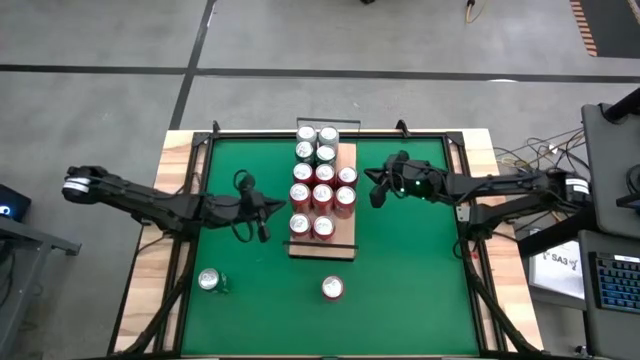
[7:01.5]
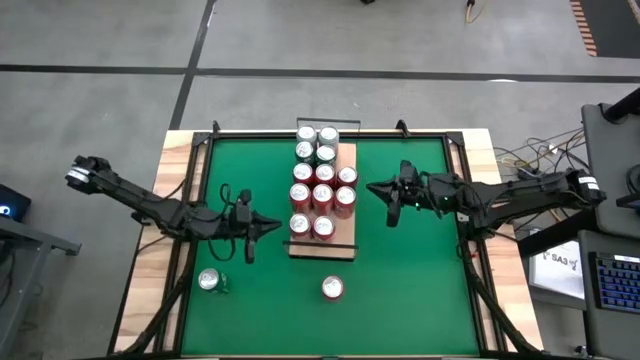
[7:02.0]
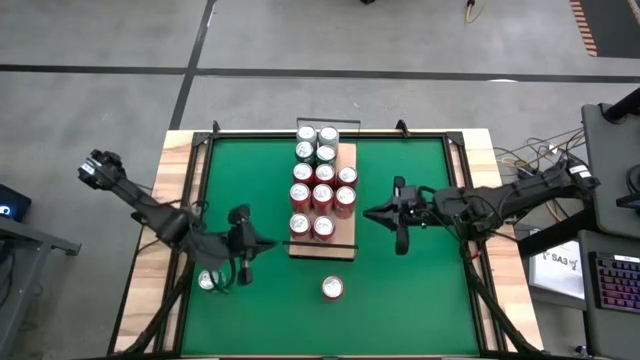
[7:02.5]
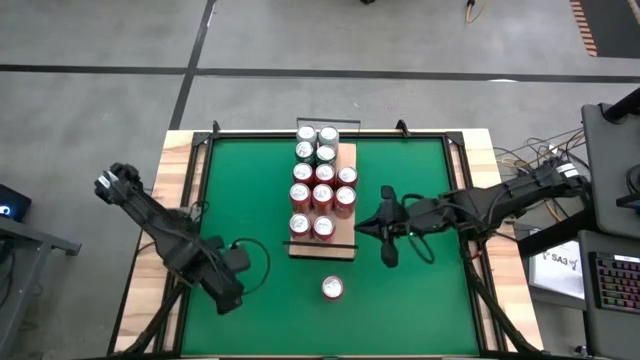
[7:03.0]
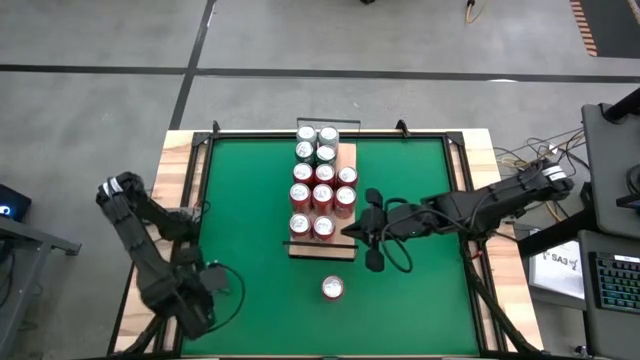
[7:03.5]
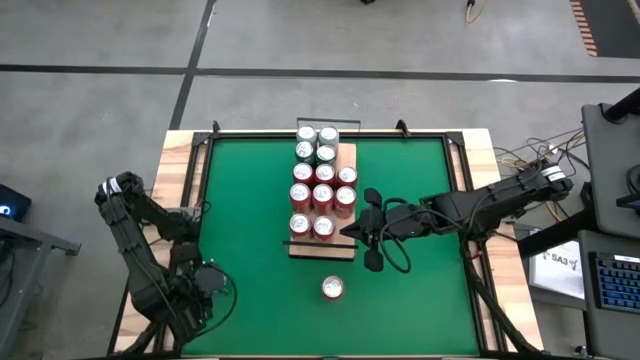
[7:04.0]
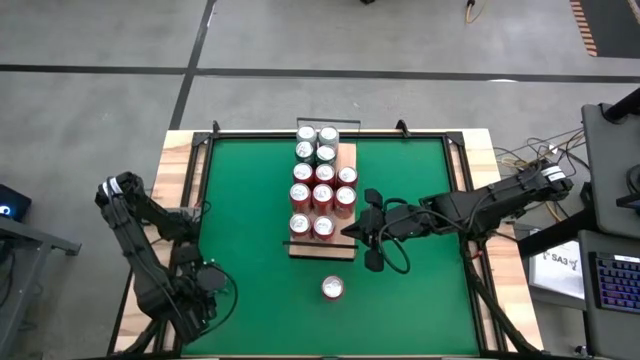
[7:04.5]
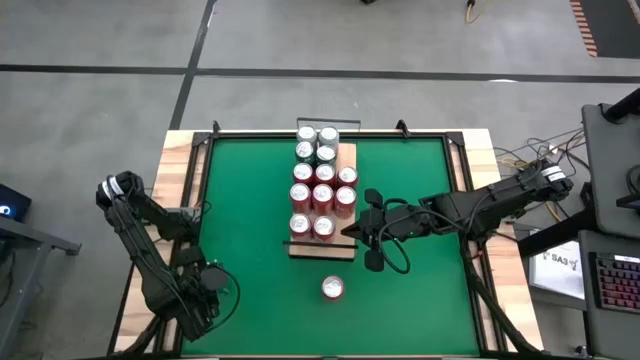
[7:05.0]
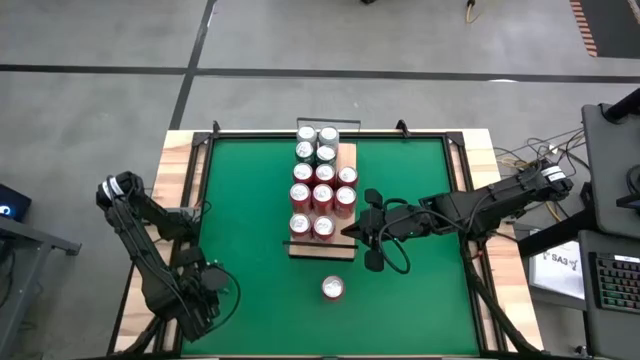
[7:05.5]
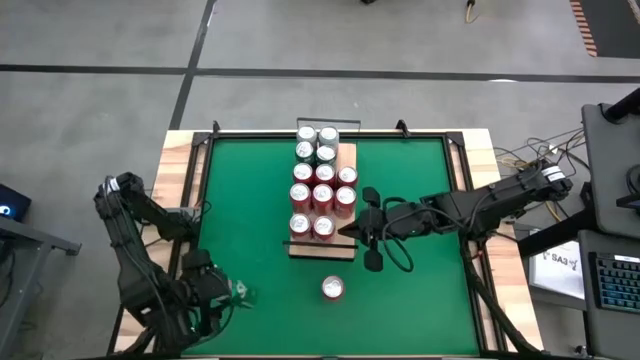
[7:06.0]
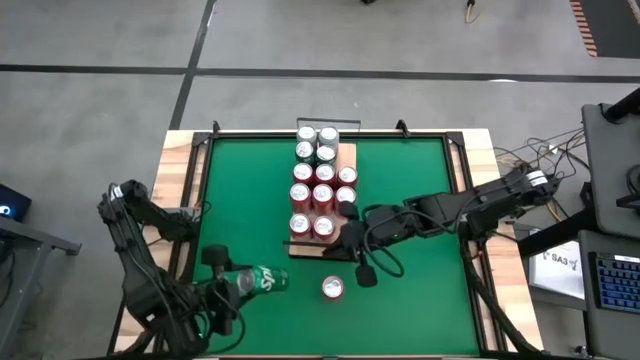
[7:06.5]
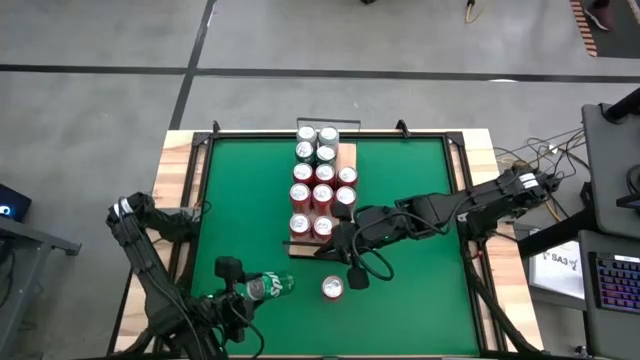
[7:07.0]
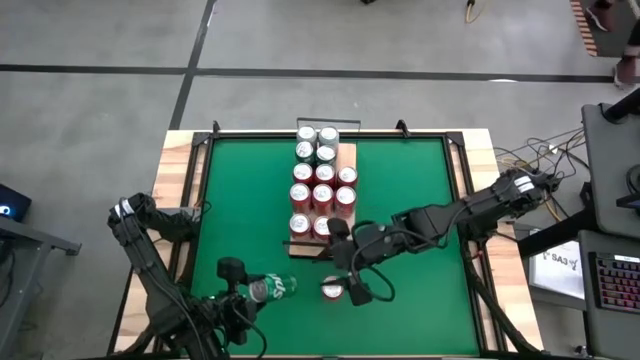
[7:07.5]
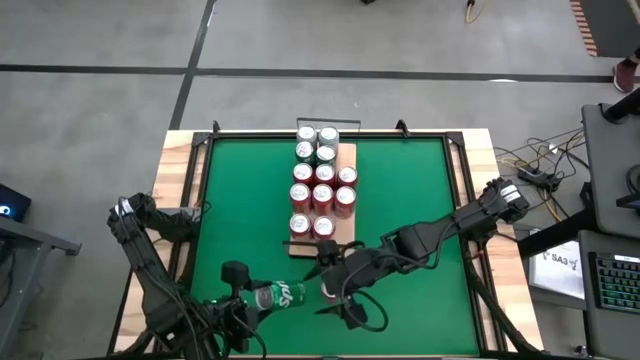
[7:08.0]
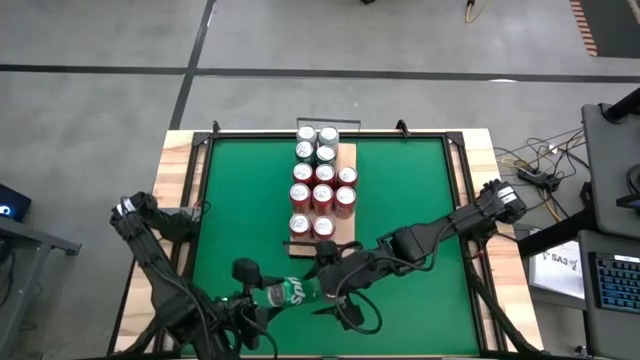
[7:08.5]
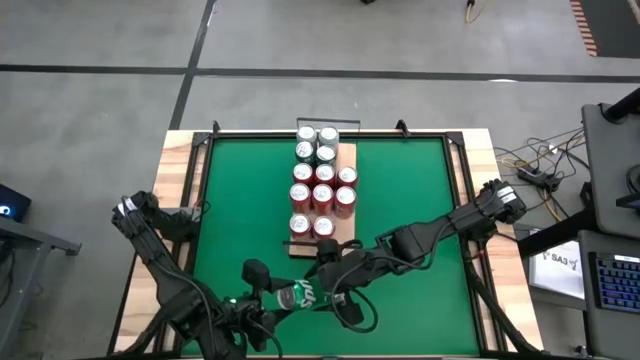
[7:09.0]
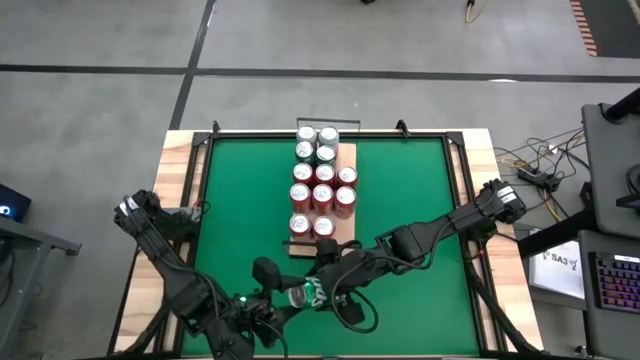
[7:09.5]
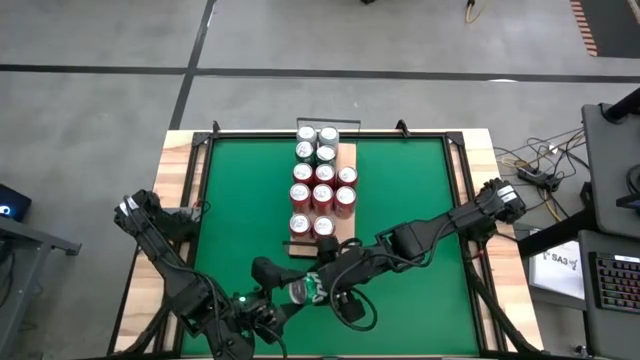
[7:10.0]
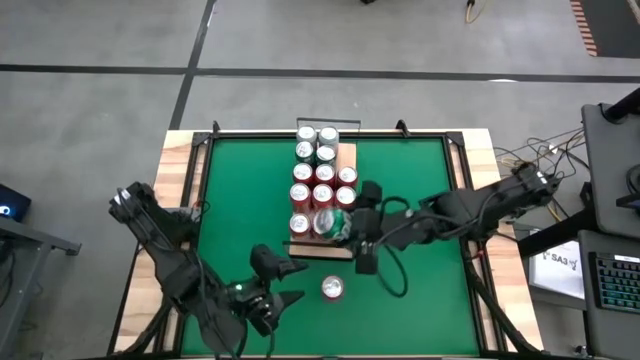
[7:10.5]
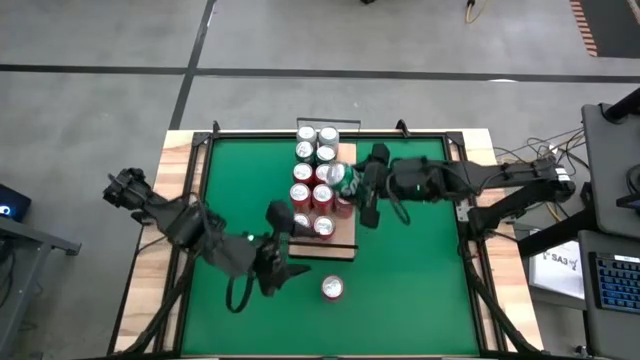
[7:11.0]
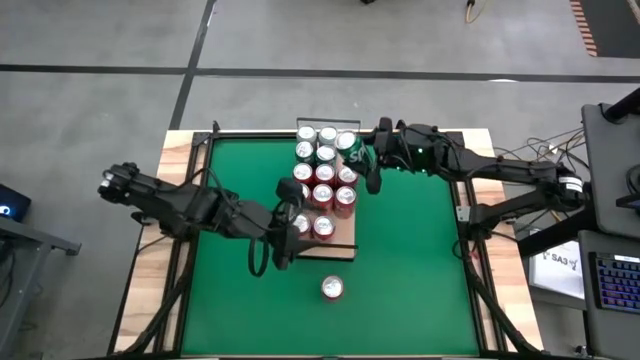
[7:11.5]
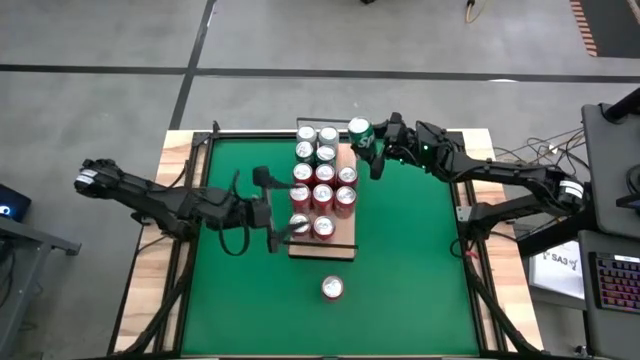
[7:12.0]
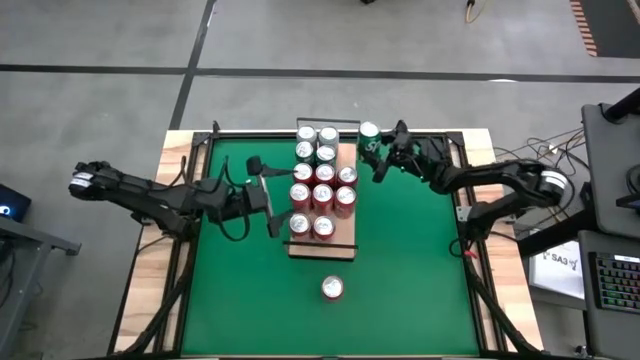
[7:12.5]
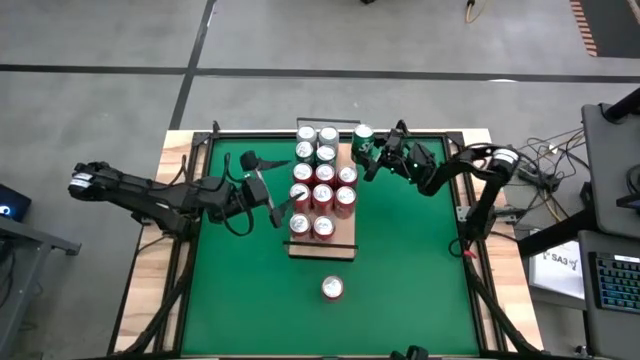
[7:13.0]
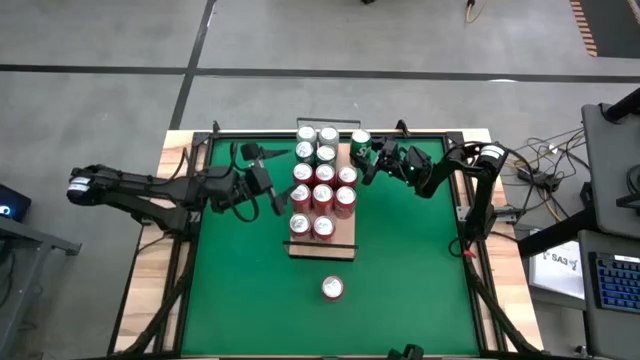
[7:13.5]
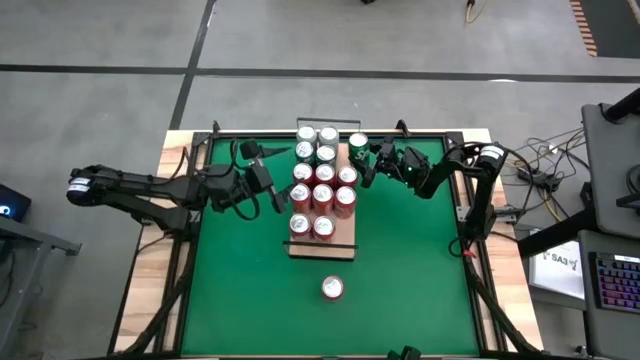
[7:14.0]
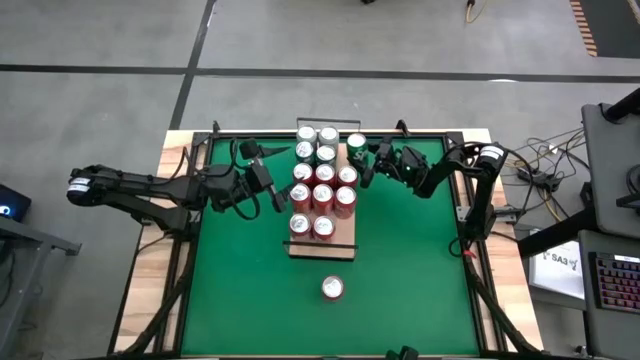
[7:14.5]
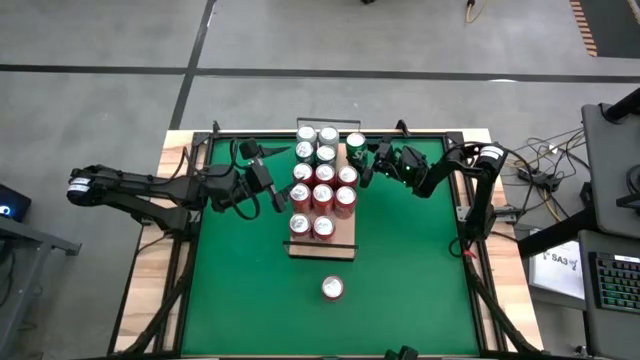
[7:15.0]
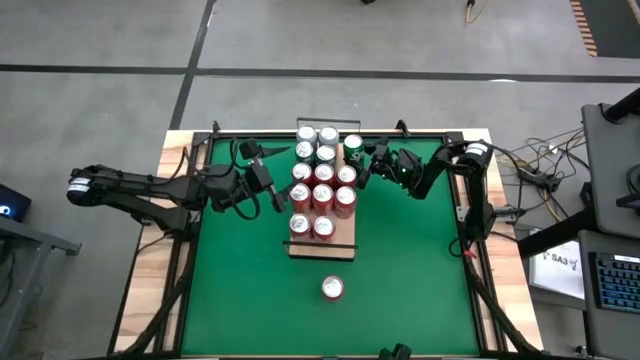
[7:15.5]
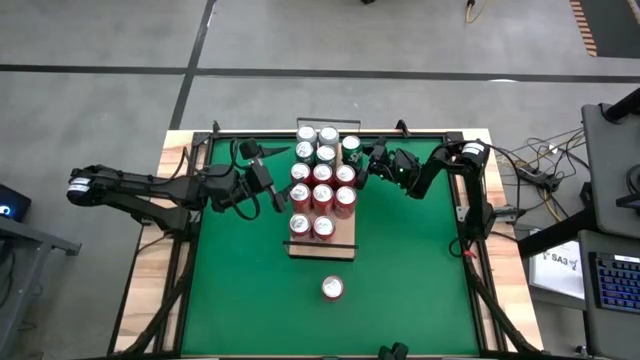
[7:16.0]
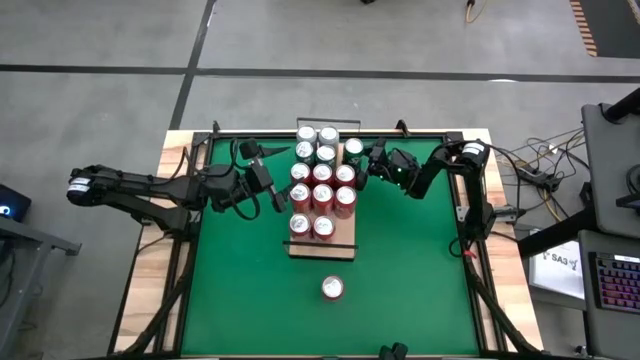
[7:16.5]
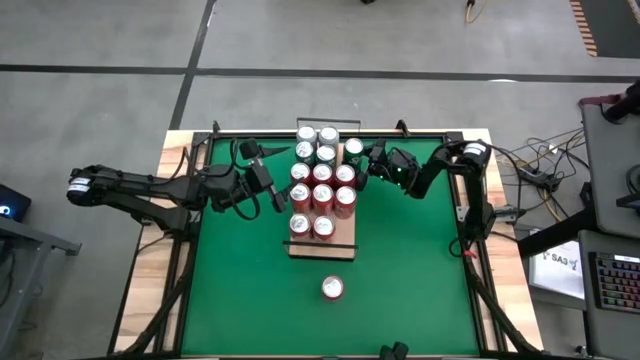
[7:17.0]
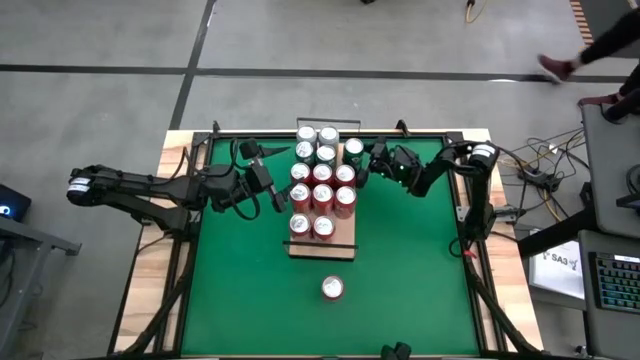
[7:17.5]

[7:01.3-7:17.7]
Task: Place canned beverage on shelf
Put the green soda can on the shelf and aligned with the other green soda can

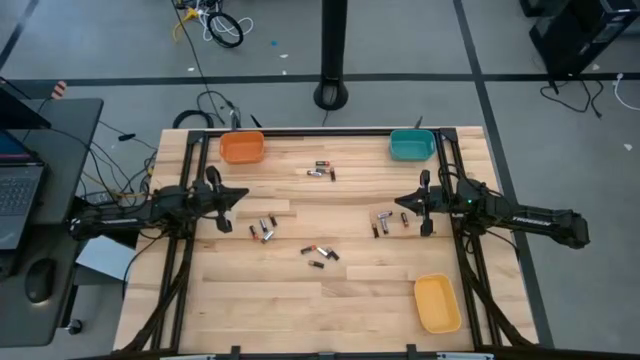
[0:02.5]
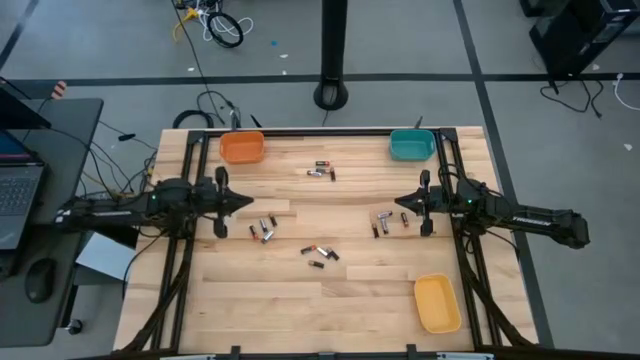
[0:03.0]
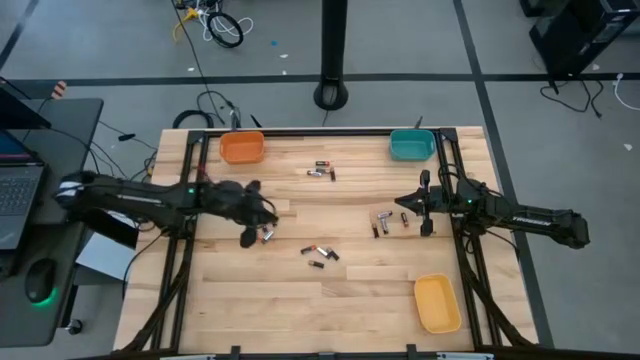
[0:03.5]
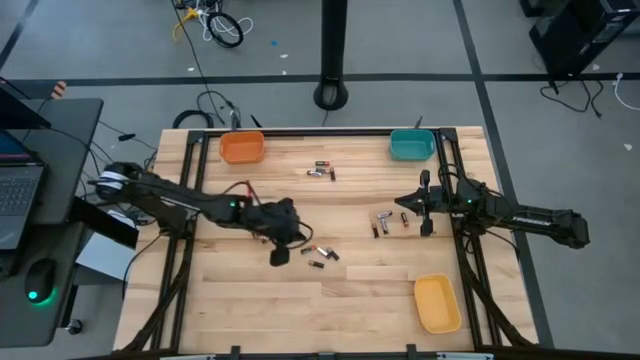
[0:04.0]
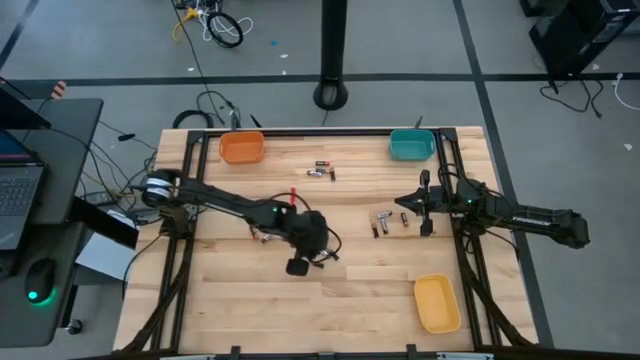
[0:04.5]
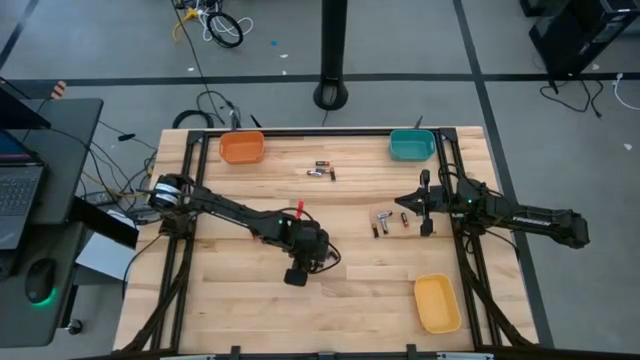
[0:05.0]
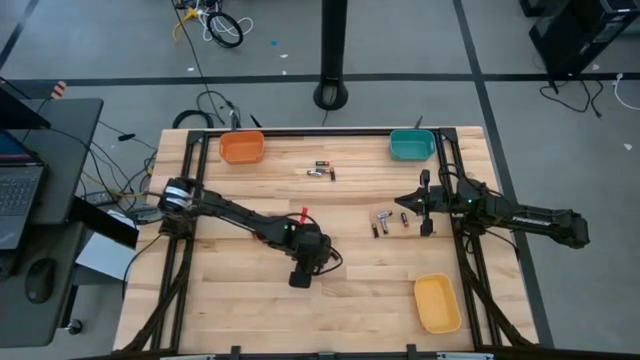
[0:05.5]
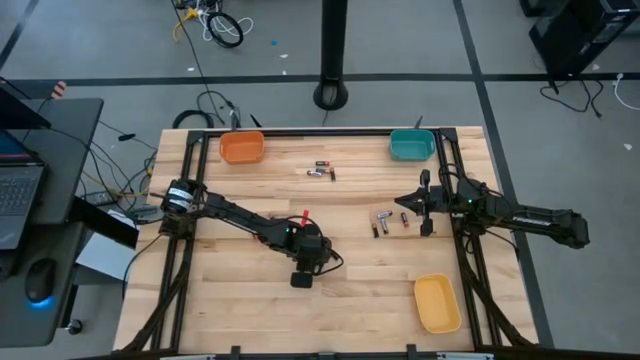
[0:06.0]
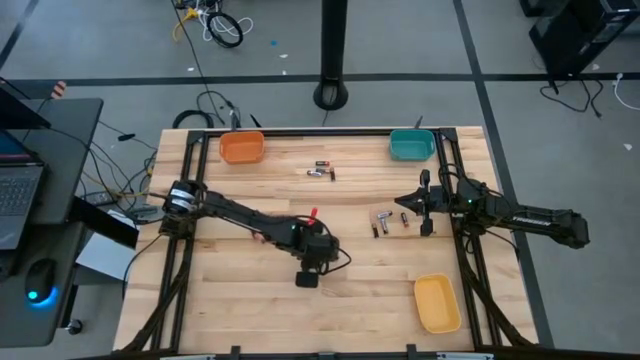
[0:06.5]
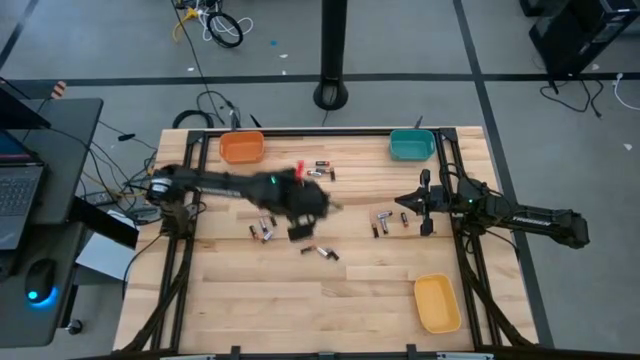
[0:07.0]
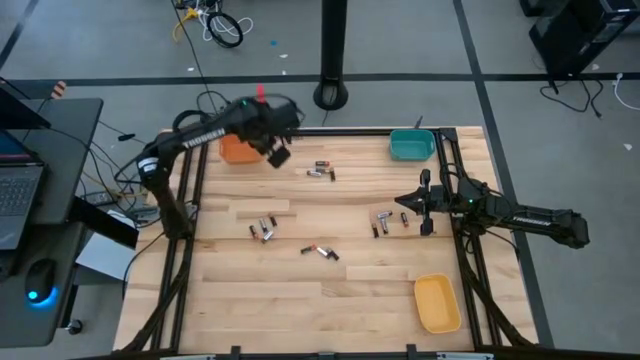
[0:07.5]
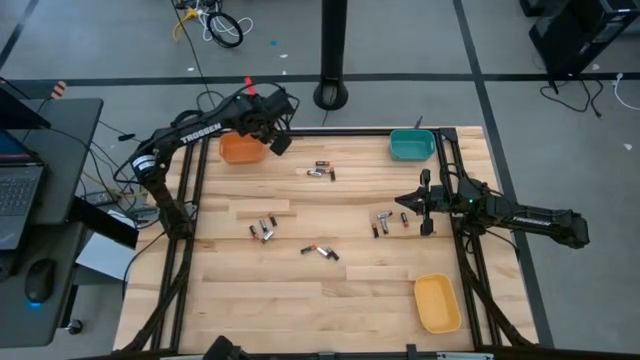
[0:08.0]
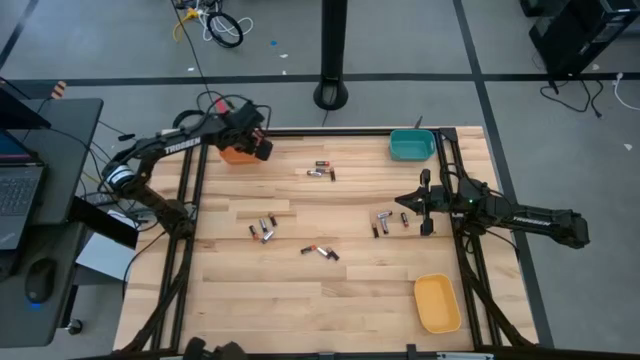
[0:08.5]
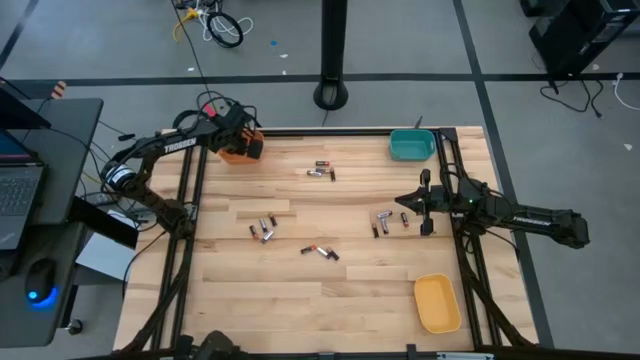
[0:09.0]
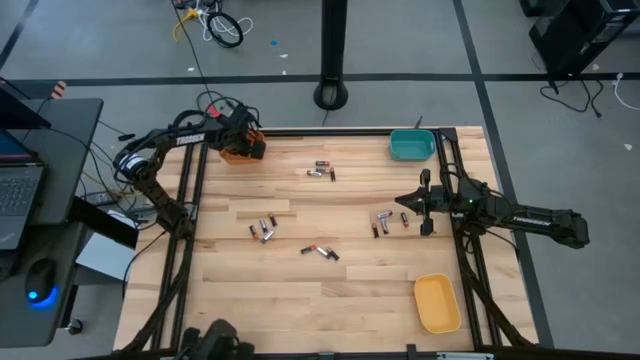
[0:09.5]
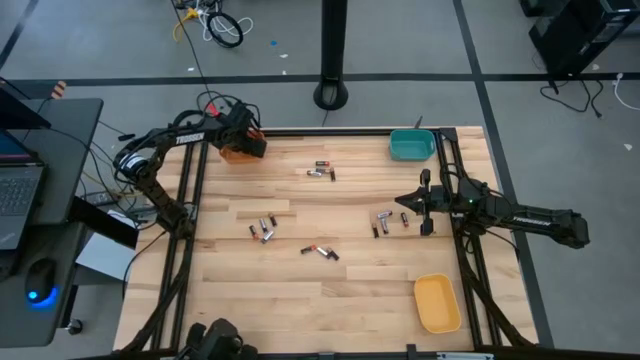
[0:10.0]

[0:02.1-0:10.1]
Task: Sort batteries
Put the black-orange battery into the orange bin
